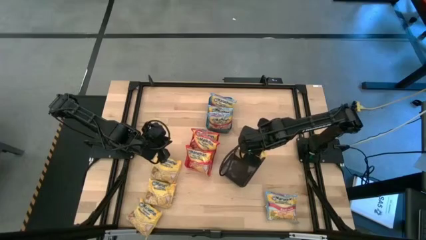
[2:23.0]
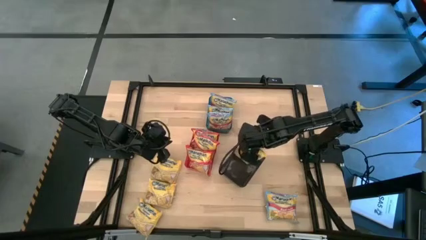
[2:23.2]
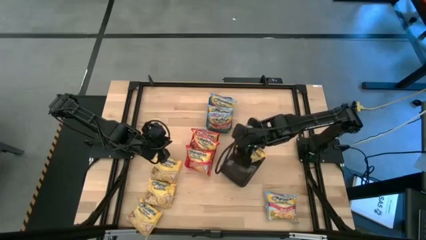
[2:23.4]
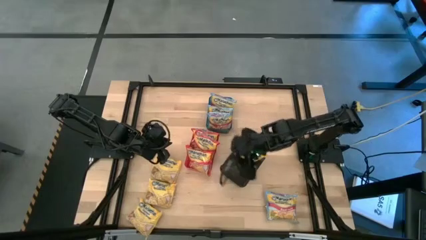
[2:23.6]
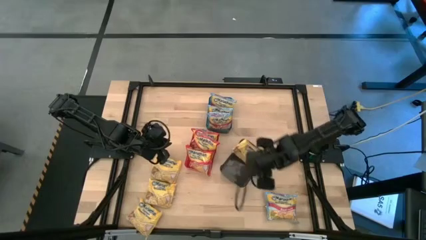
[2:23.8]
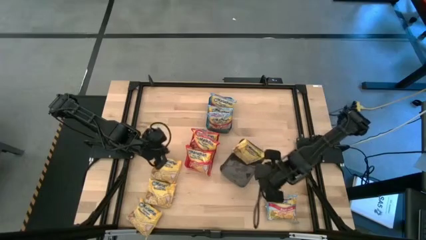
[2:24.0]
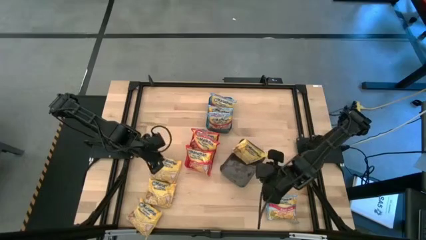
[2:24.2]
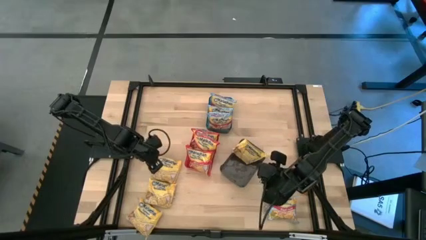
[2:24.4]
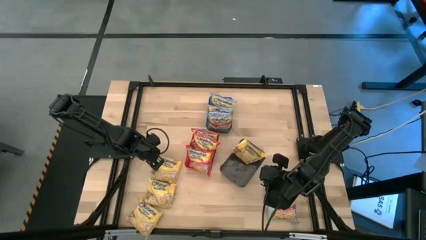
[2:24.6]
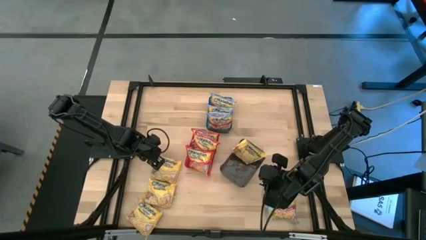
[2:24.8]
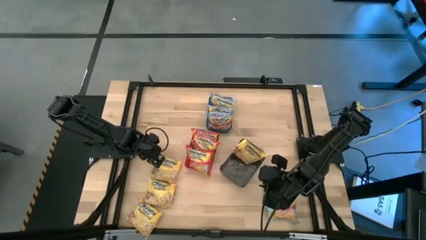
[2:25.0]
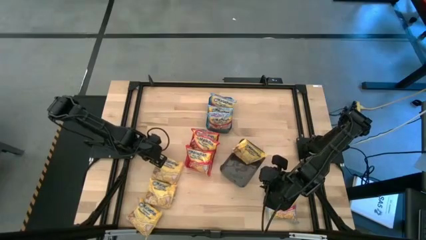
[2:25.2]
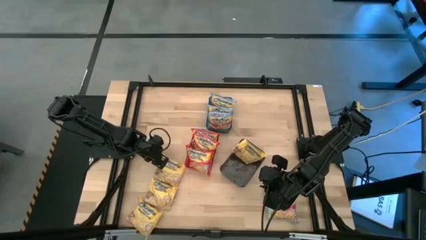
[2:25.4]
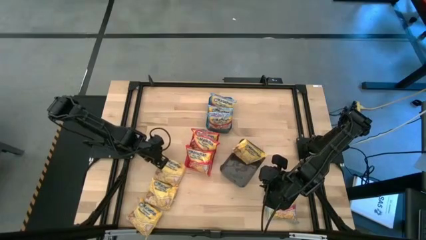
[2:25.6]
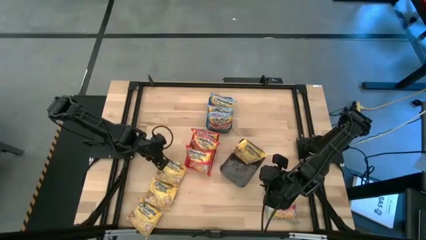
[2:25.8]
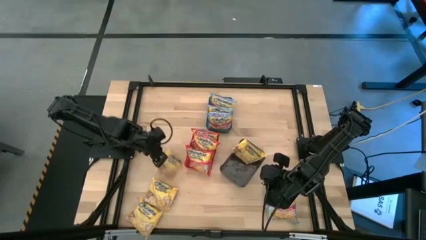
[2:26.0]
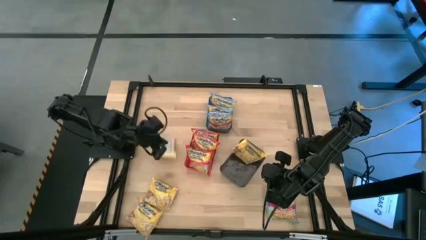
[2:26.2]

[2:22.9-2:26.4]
Task: Sort Maruchan noodles
Put the yellow bag into the black bin

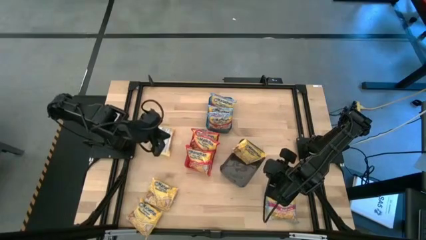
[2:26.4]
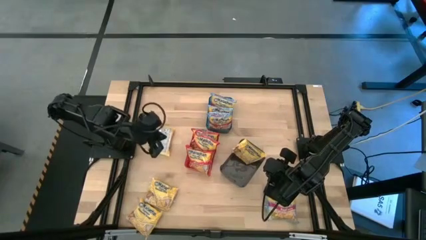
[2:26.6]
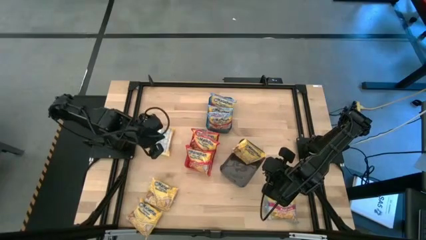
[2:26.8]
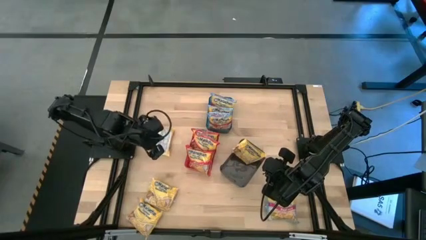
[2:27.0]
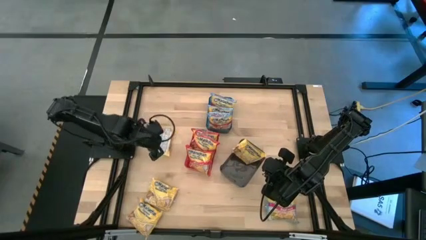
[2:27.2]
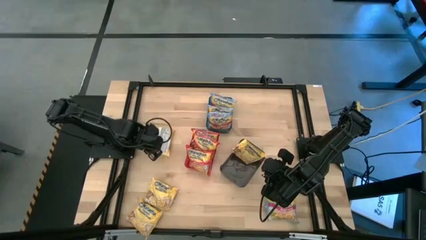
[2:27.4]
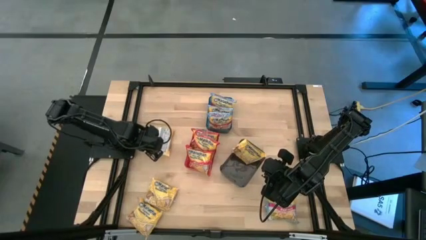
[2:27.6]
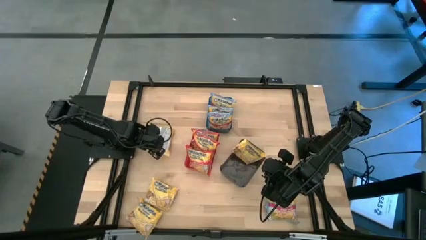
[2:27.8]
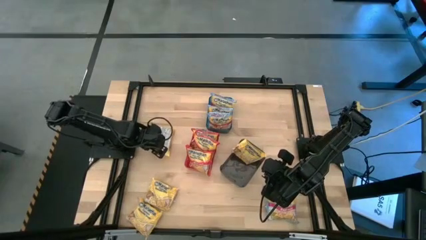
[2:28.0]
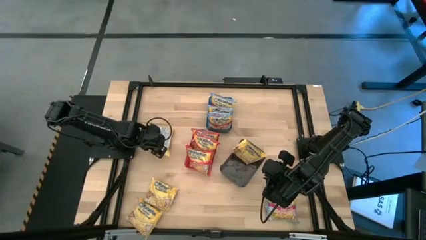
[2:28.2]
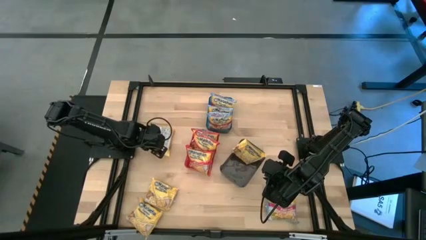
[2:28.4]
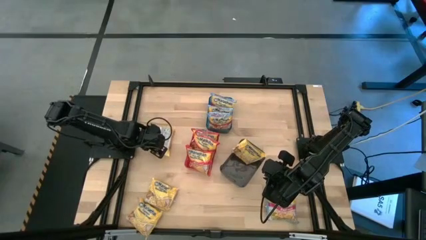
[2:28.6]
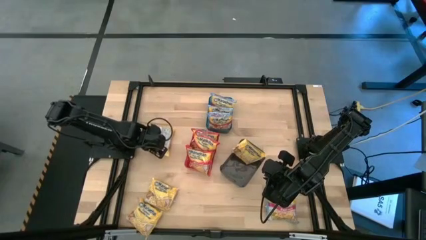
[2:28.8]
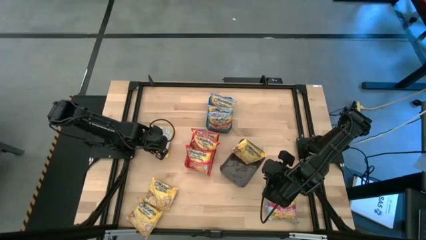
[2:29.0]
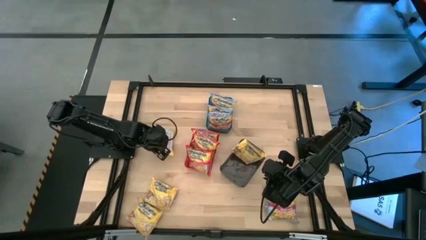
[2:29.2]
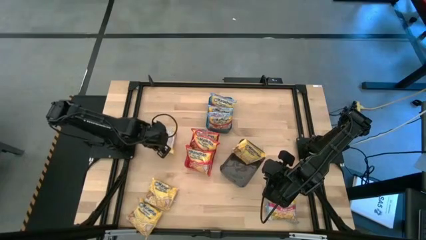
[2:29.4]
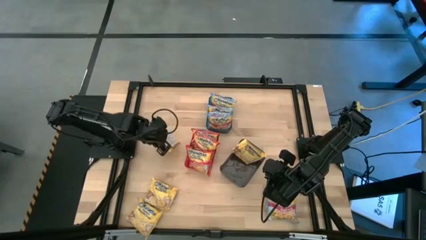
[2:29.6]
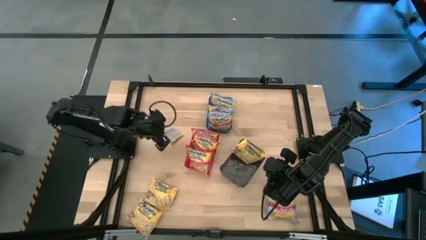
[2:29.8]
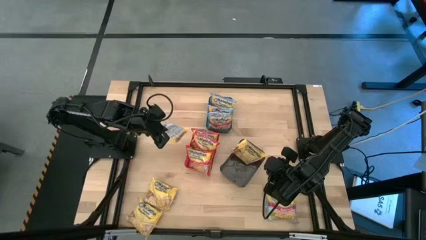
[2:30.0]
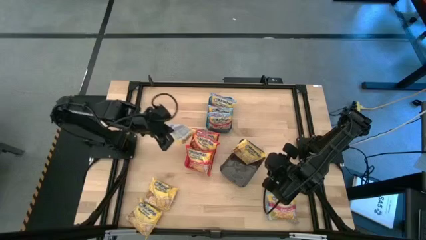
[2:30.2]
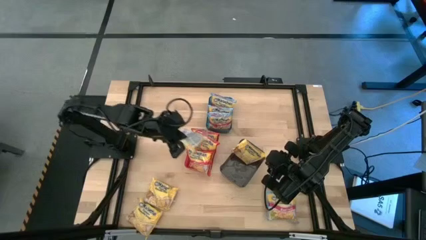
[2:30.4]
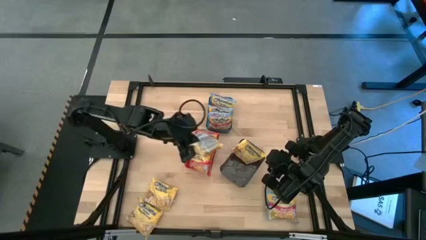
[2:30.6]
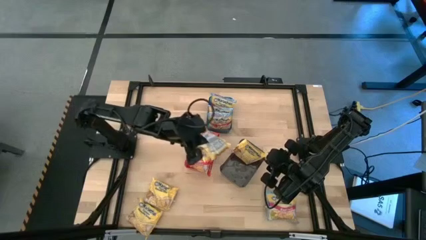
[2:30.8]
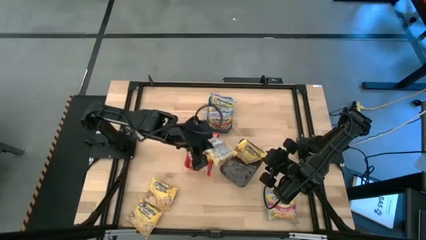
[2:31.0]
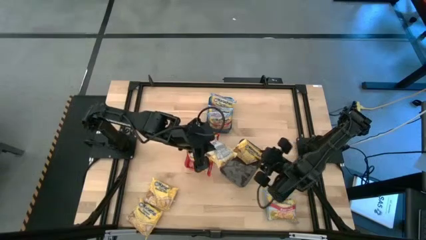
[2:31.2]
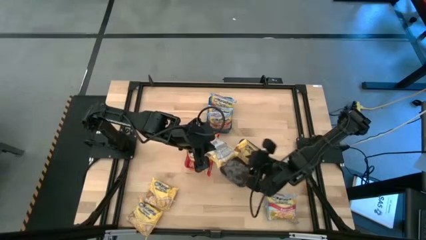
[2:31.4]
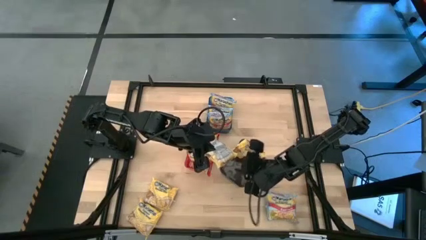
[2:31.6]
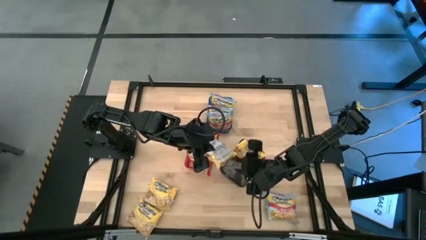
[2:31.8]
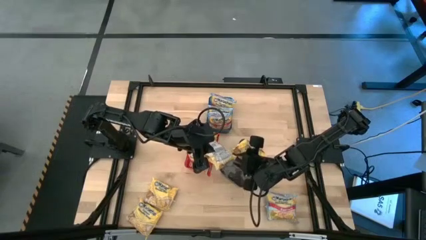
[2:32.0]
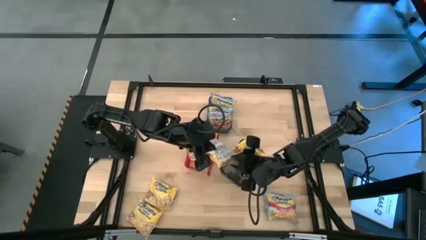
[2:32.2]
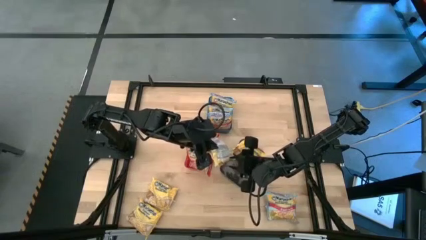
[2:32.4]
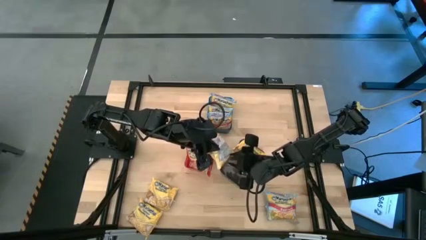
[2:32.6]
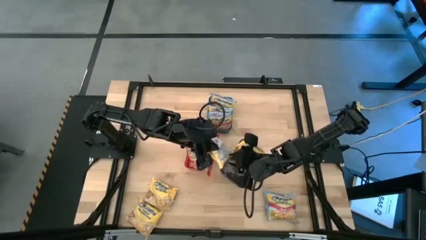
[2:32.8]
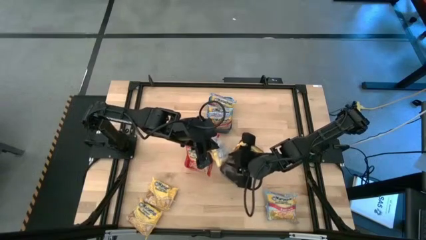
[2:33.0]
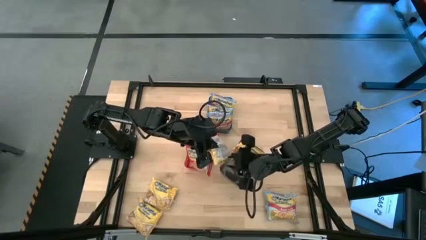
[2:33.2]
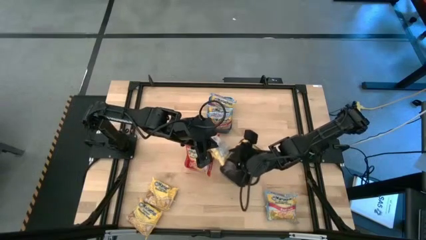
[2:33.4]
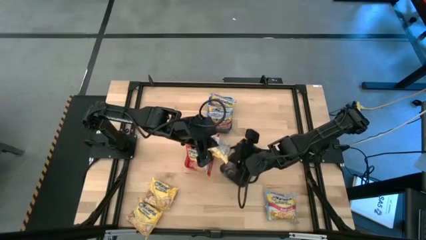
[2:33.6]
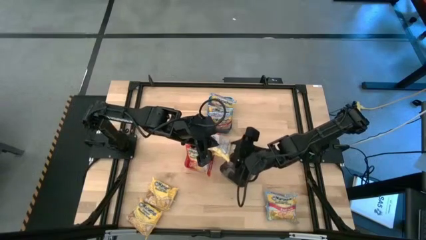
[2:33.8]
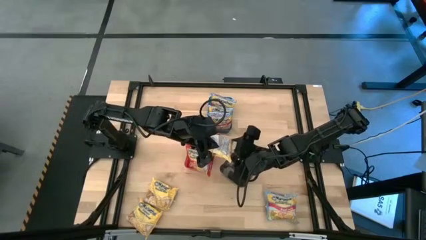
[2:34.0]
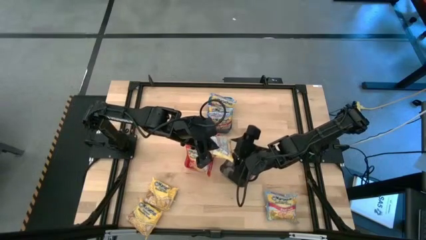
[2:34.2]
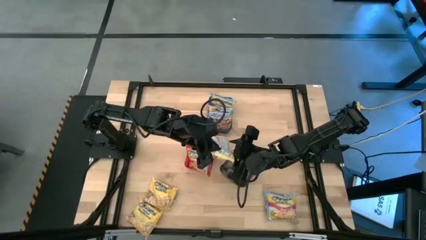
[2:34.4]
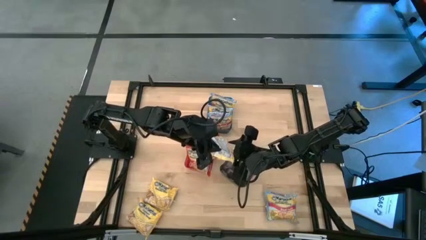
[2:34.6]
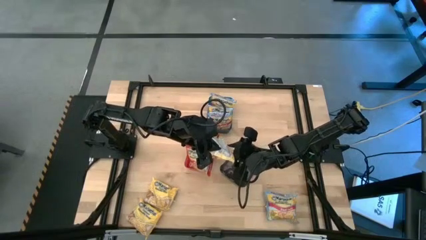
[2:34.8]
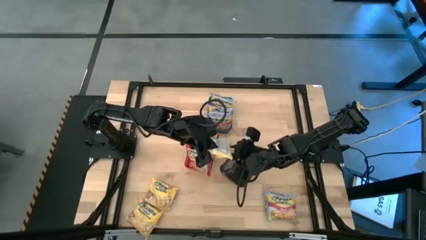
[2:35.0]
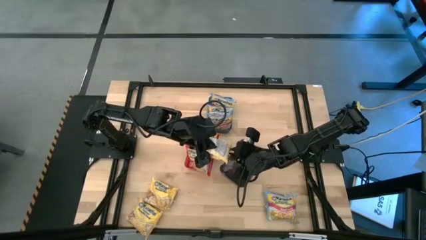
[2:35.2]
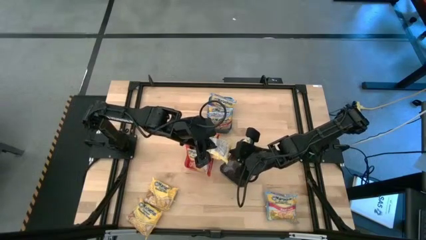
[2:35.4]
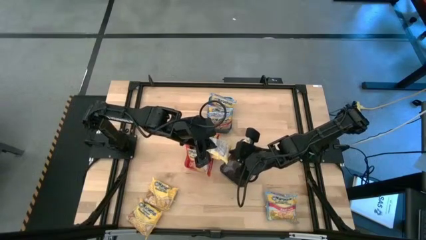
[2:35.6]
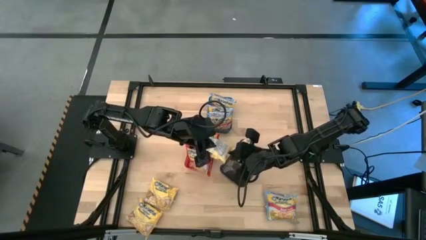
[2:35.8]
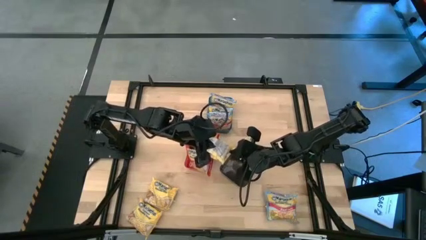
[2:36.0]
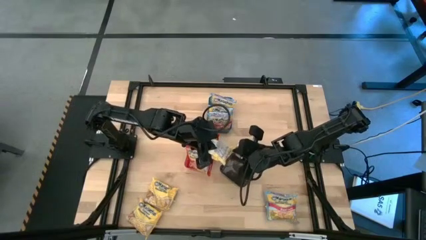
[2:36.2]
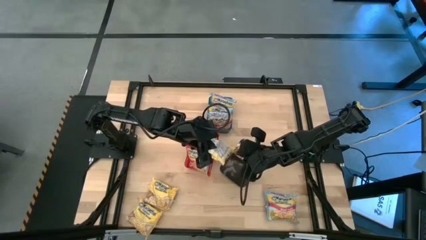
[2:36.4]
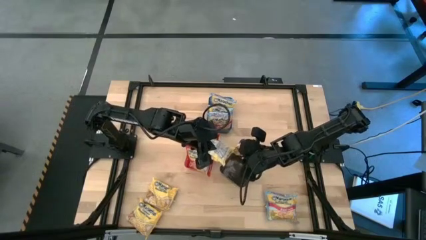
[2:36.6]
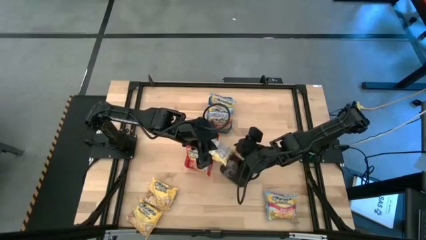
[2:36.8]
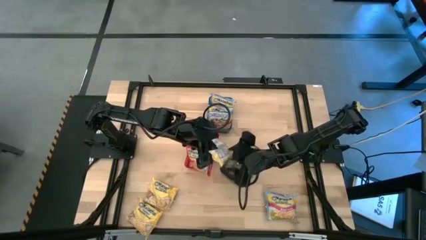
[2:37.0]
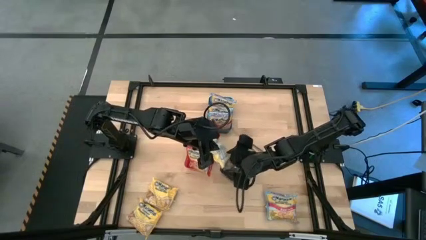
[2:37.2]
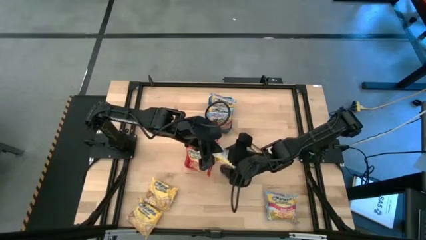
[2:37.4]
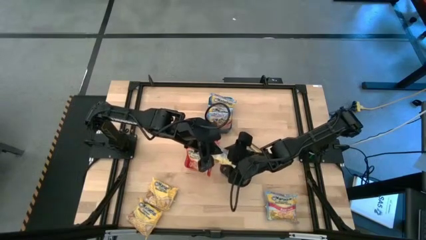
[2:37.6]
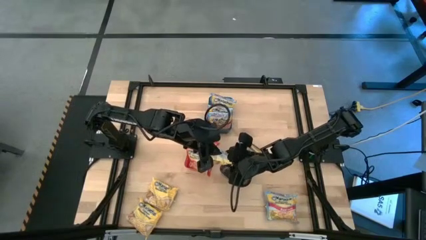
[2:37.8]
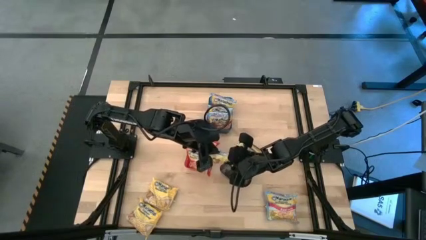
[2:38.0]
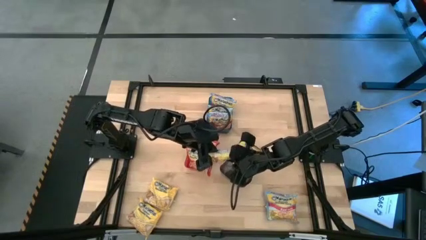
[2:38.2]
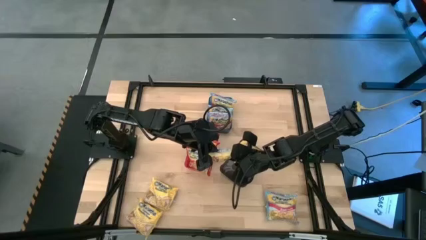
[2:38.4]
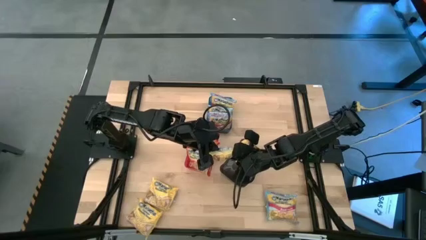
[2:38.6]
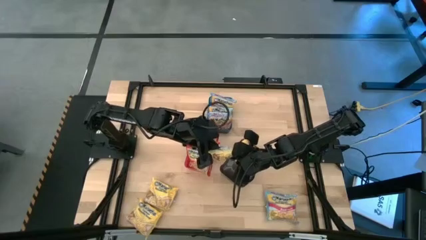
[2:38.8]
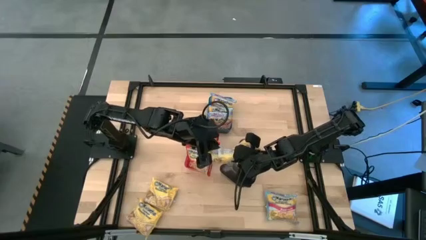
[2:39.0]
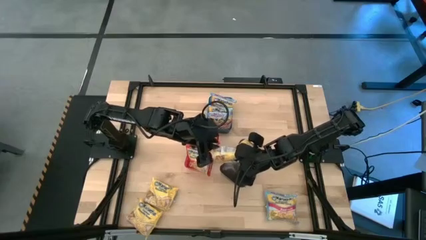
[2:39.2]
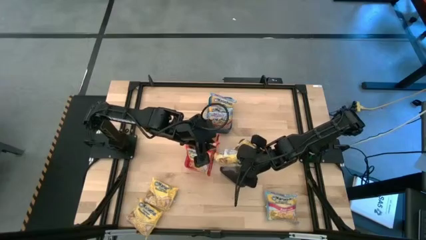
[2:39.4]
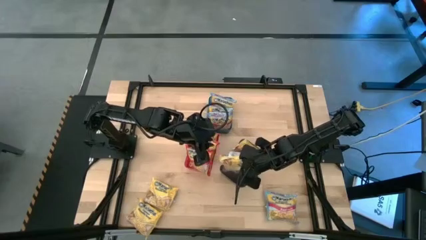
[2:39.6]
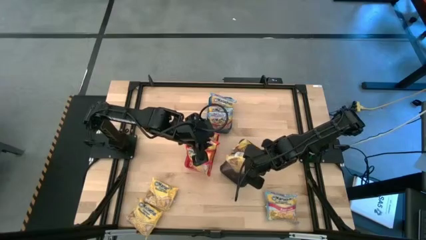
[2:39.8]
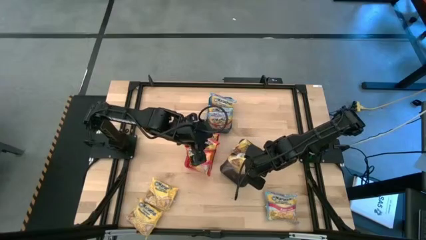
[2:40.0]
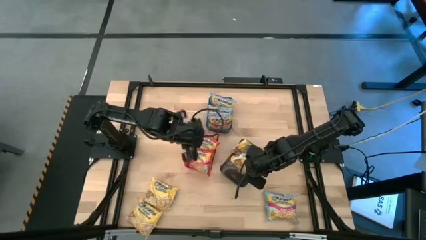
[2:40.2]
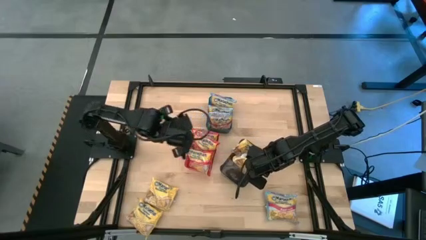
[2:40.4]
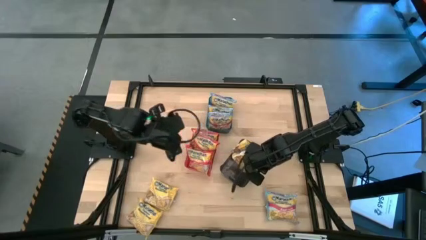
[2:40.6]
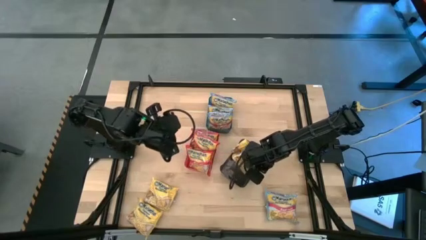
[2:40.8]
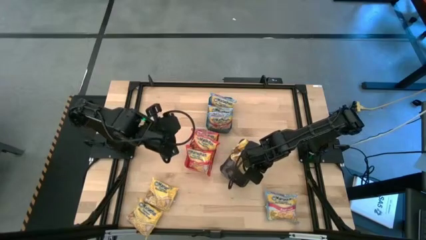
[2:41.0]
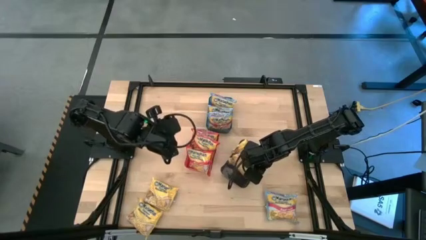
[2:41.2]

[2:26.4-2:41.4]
Put the yellow bag into the black bin
